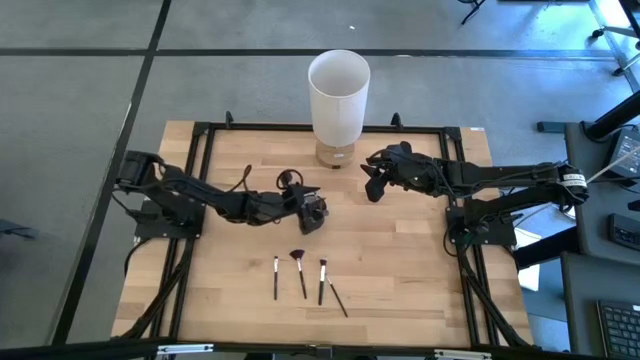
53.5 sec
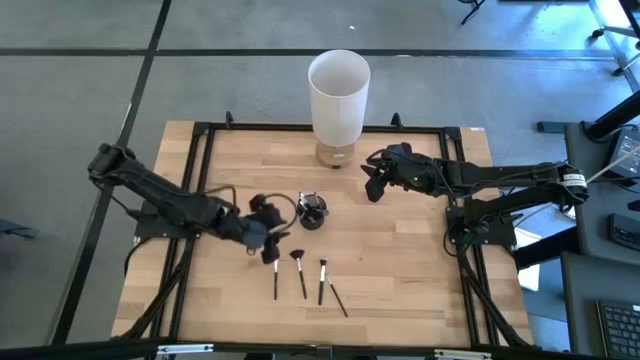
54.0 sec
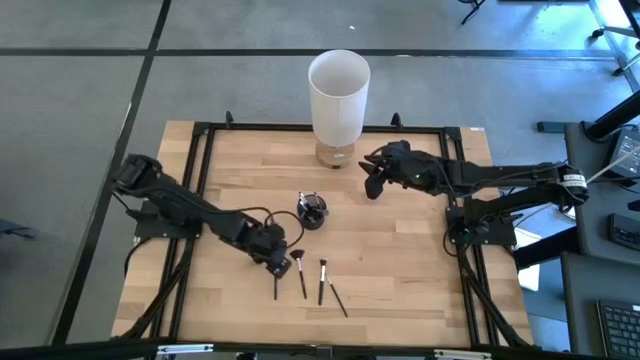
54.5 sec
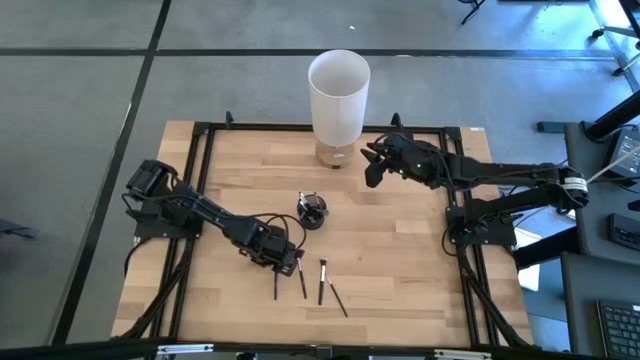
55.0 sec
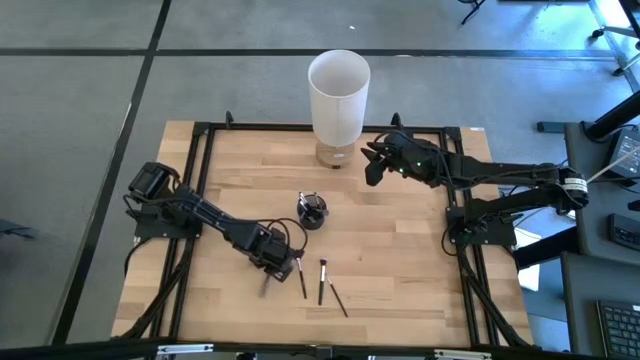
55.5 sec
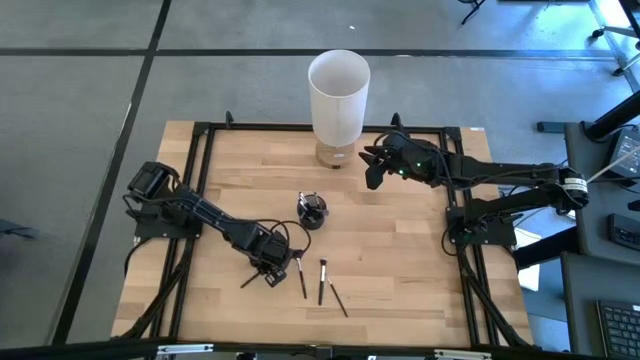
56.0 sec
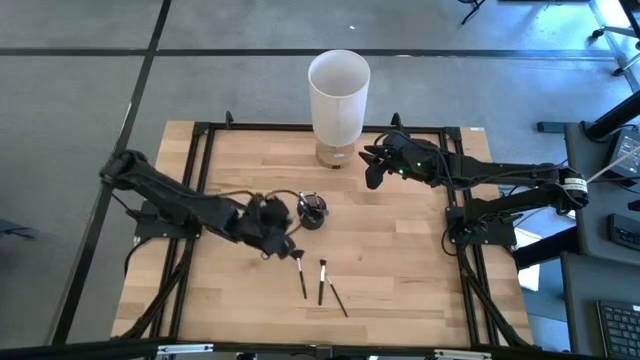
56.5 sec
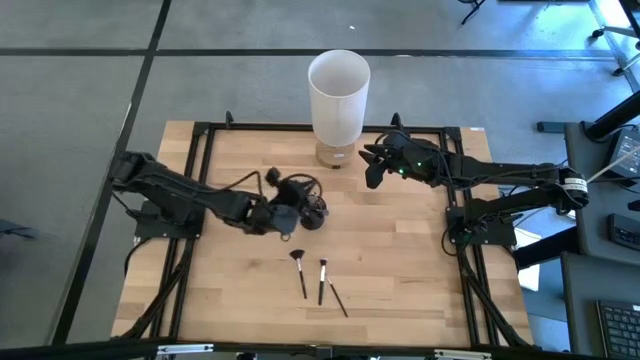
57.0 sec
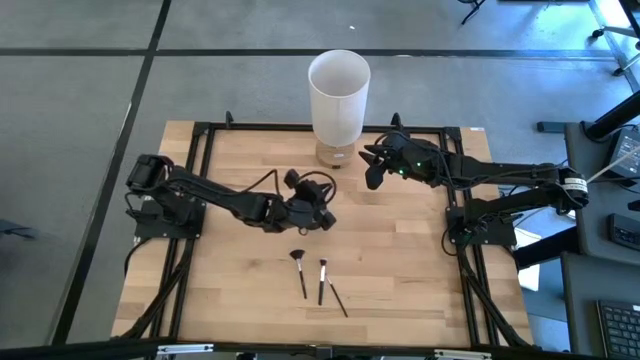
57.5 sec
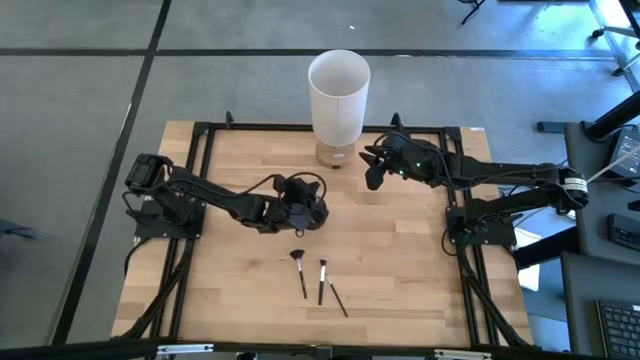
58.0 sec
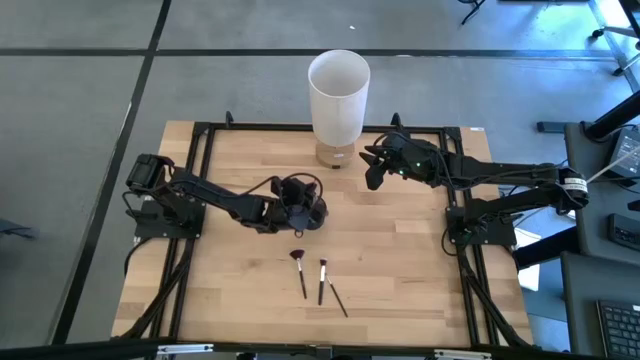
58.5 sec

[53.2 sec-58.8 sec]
Task: Put items in baskets/containers
Put the black eyeshadow brush into the black pen holder

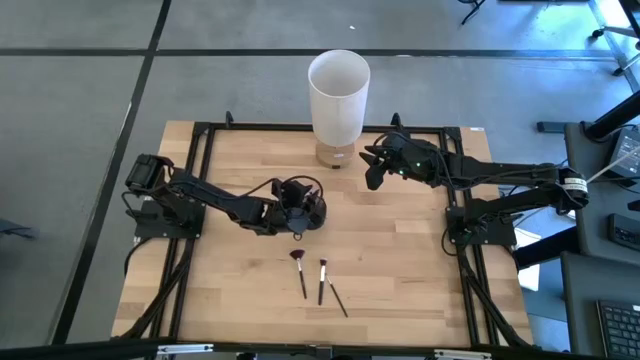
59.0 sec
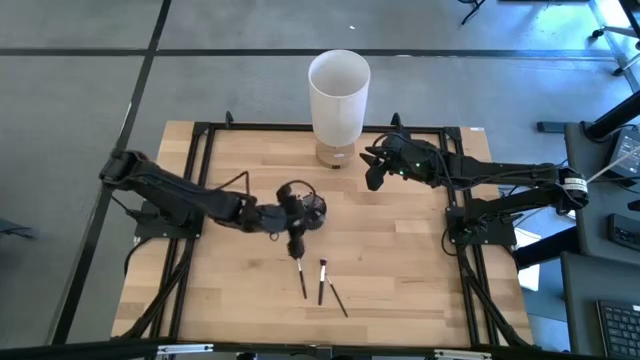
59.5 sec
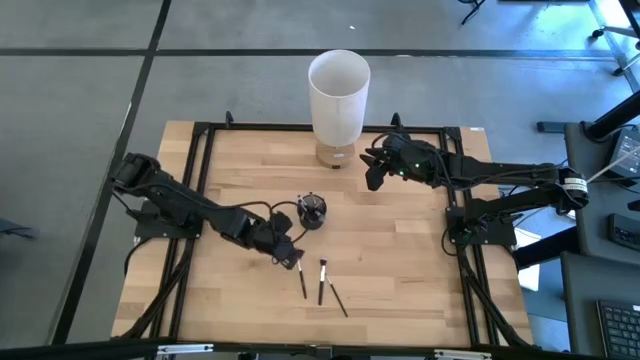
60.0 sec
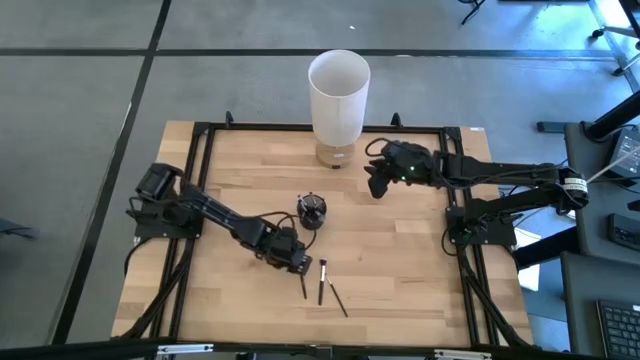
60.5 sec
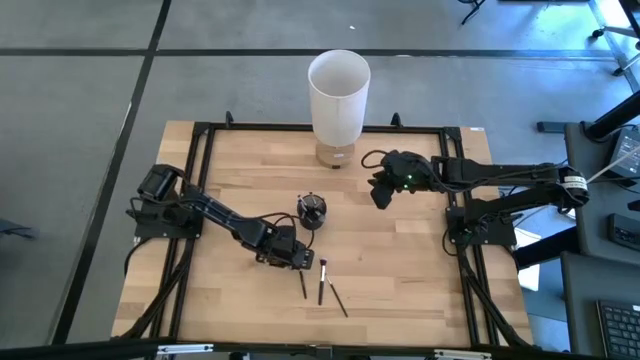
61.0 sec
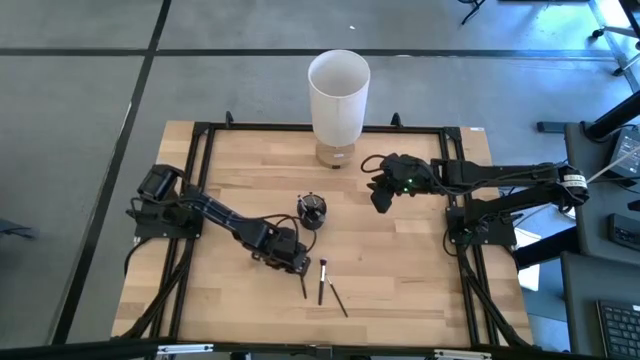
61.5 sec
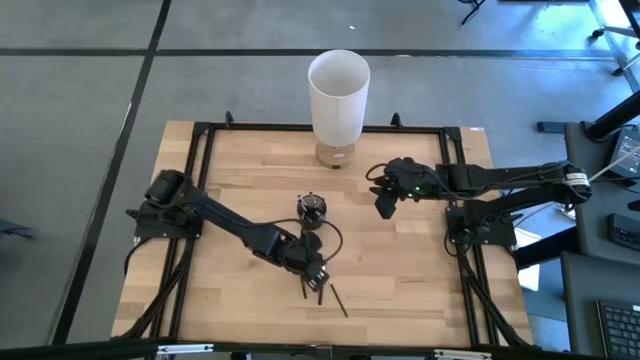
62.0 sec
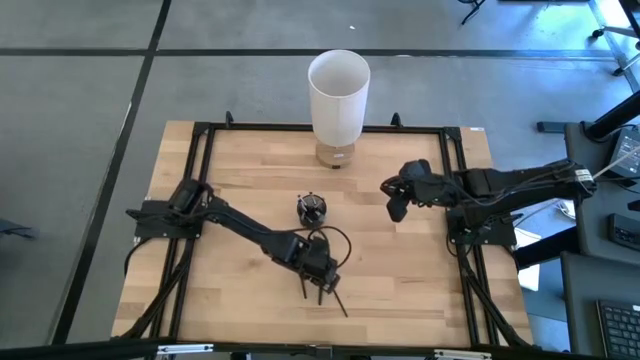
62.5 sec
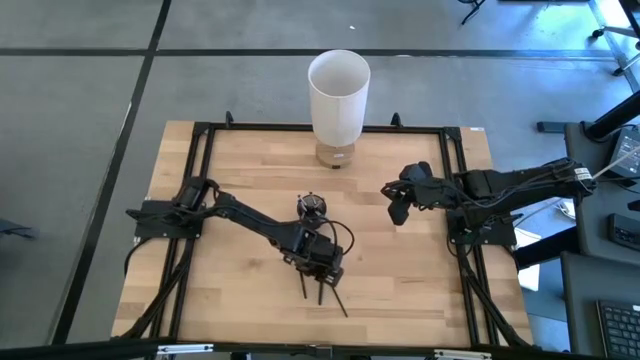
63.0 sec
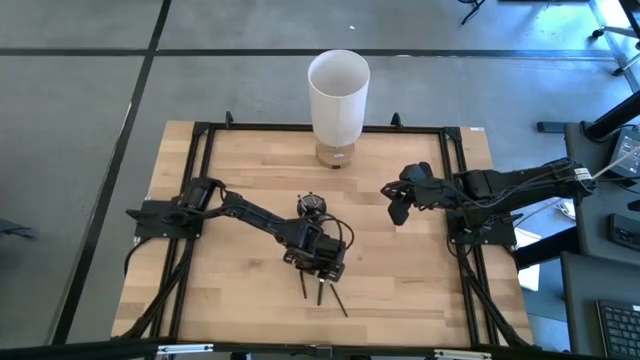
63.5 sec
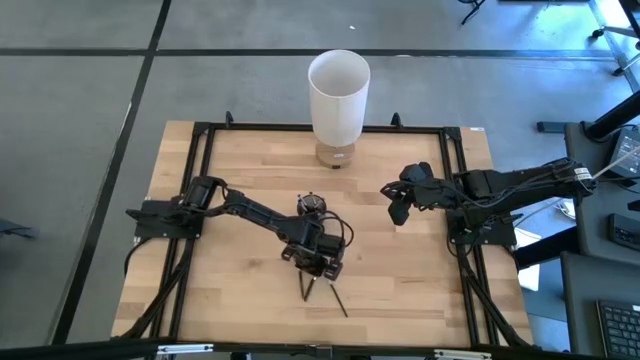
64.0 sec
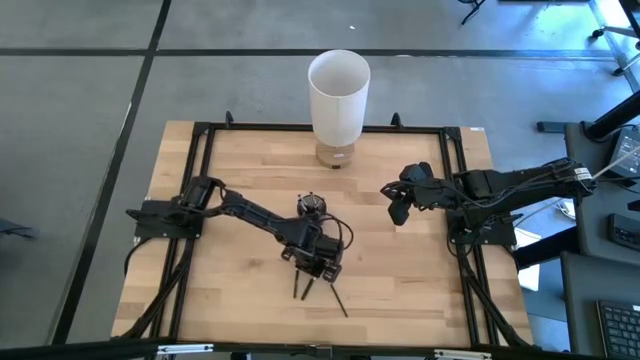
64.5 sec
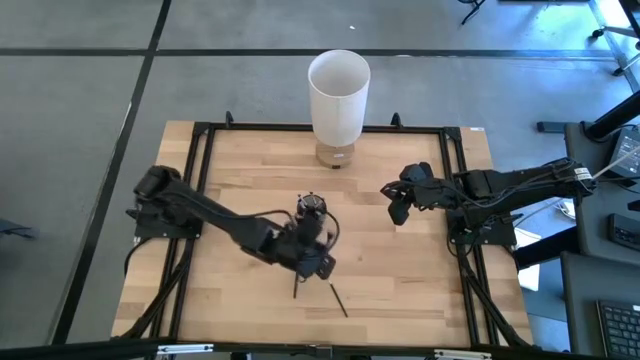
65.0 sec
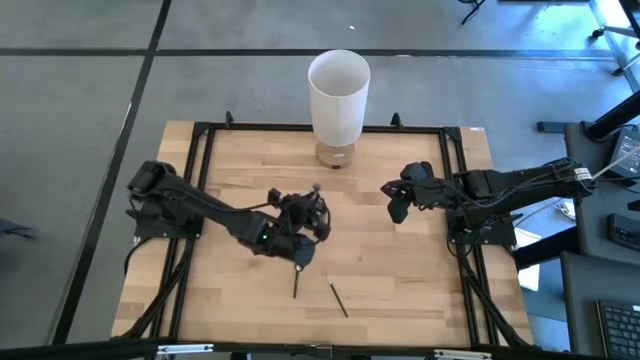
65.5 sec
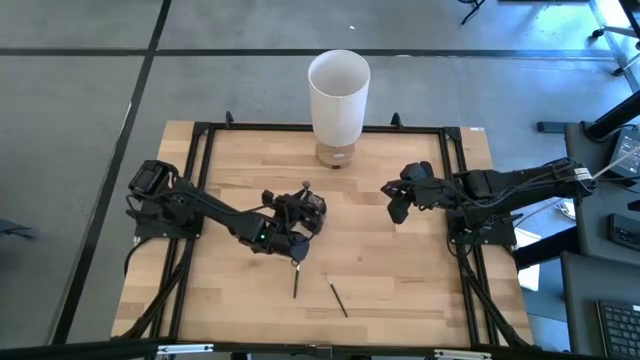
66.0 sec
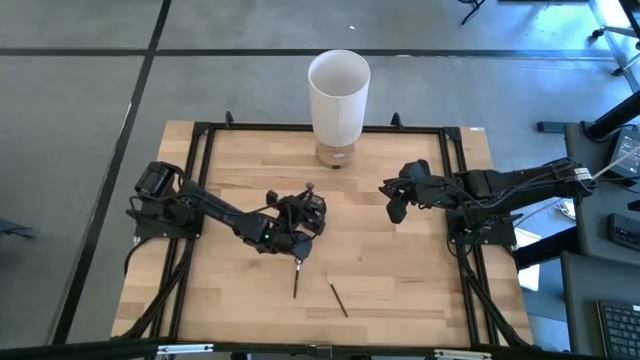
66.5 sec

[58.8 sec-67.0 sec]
Put the black powder brush into the black pen holder

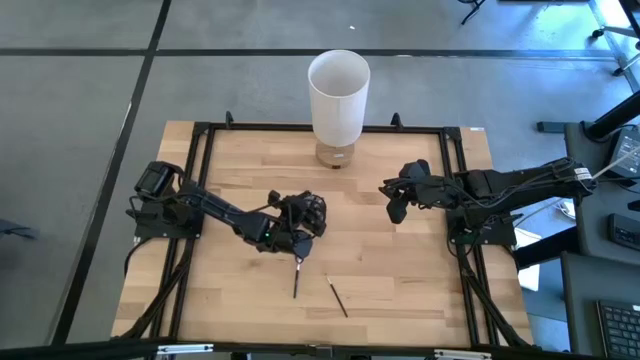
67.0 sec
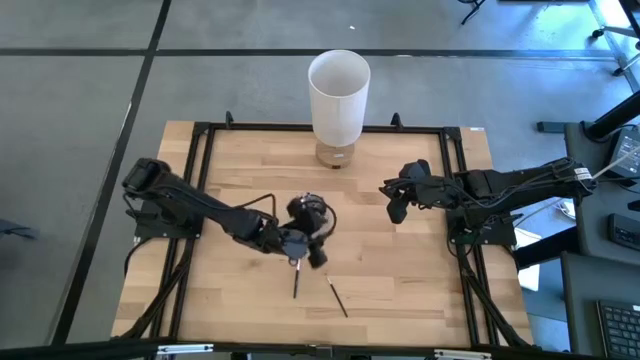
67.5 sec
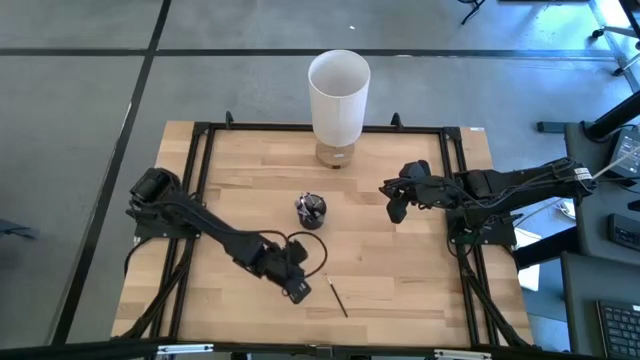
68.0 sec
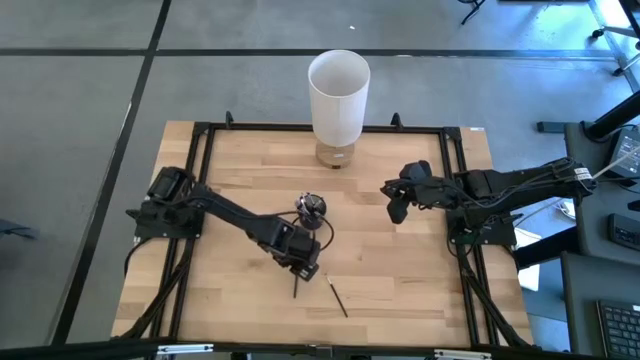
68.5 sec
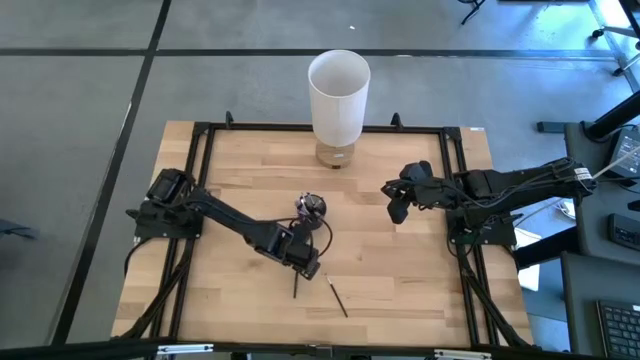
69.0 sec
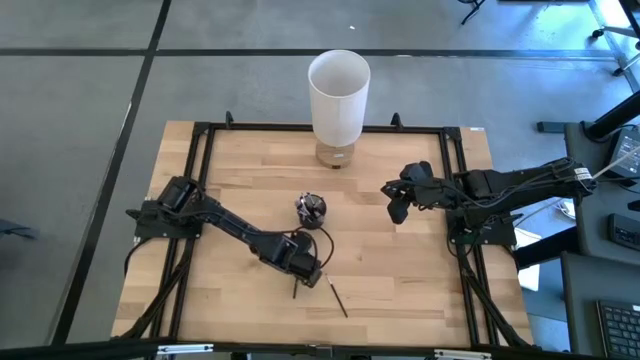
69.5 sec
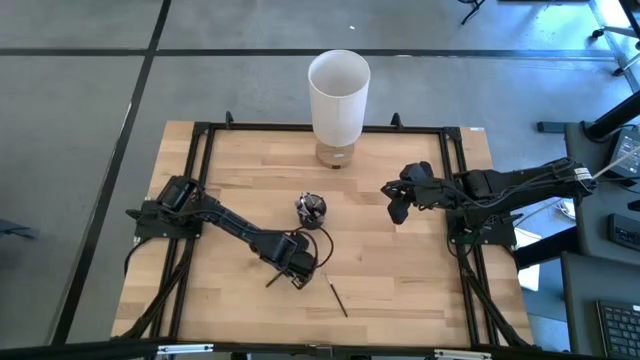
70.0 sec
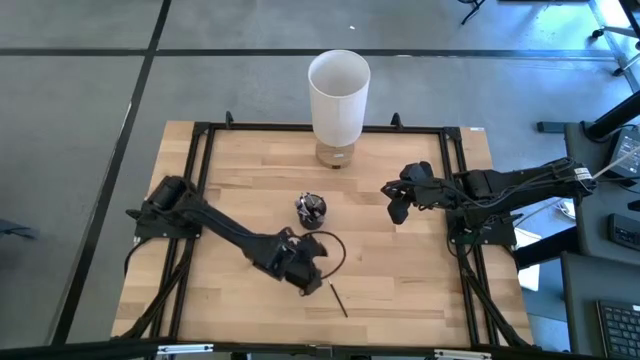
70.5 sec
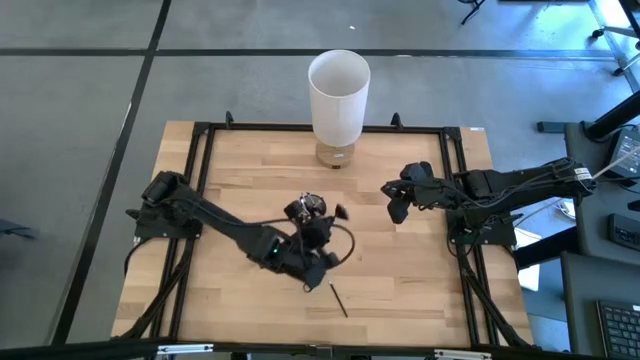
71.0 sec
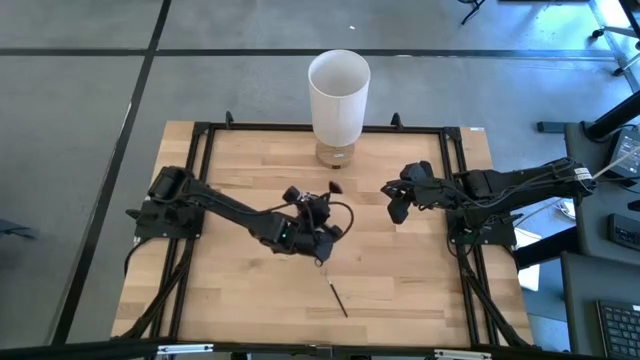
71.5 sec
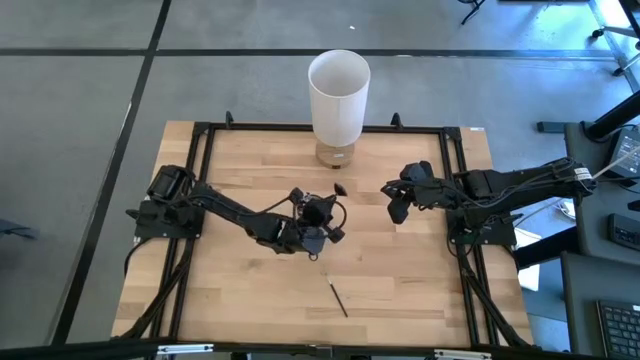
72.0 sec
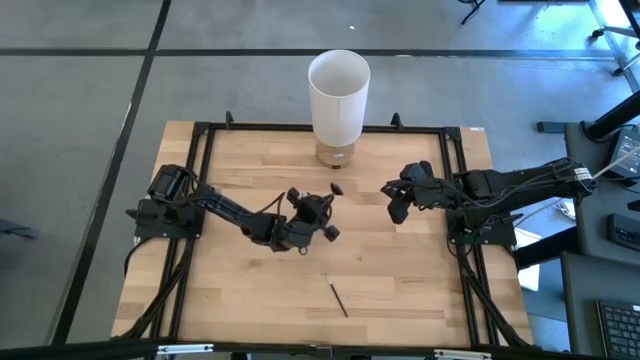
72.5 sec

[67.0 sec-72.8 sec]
Put the black highlighter brush into the black pen holder
